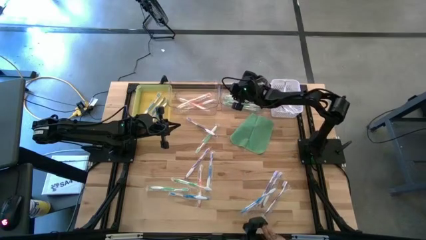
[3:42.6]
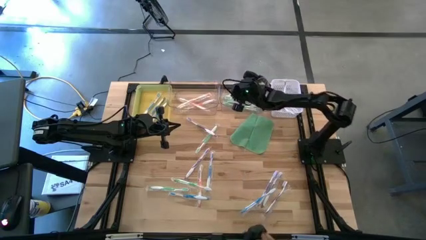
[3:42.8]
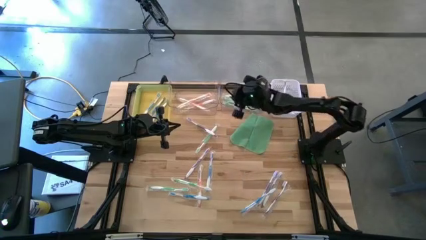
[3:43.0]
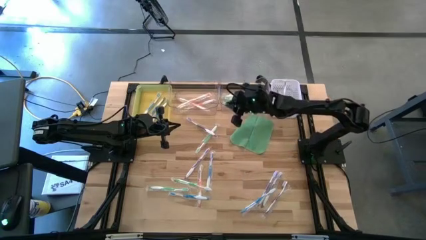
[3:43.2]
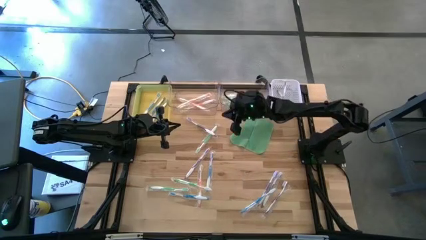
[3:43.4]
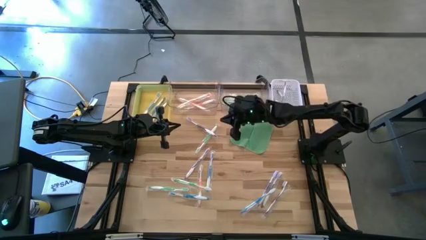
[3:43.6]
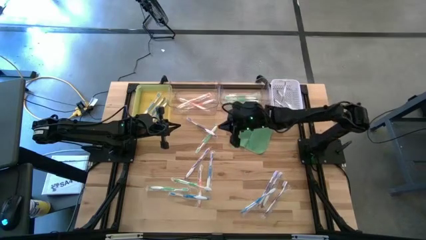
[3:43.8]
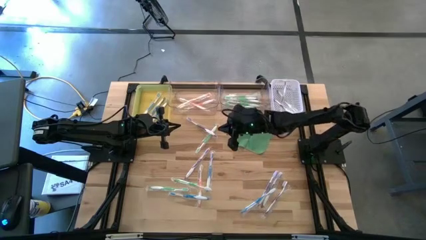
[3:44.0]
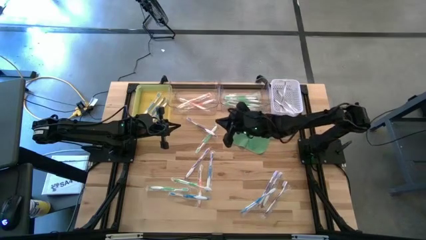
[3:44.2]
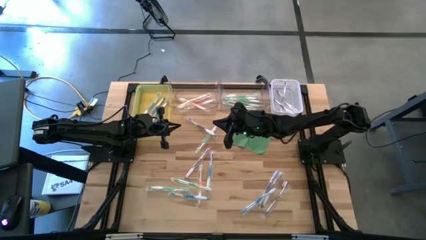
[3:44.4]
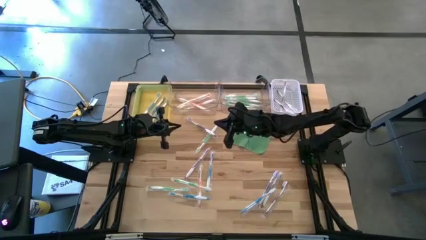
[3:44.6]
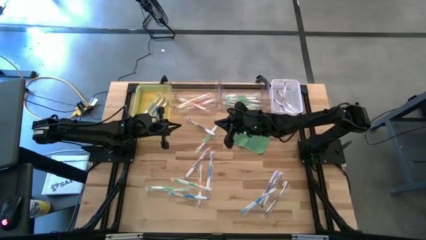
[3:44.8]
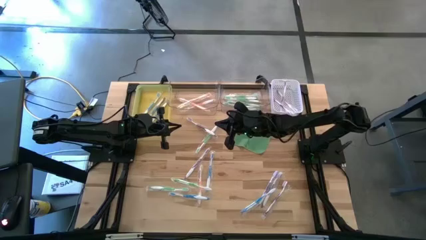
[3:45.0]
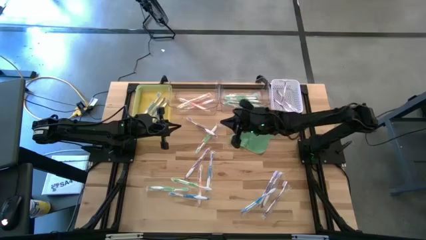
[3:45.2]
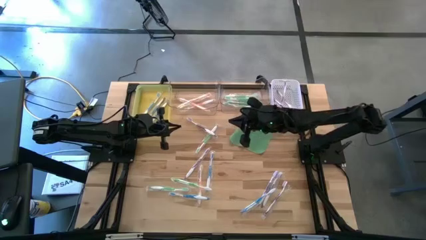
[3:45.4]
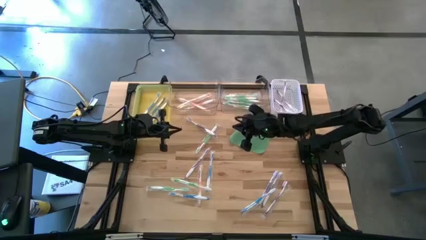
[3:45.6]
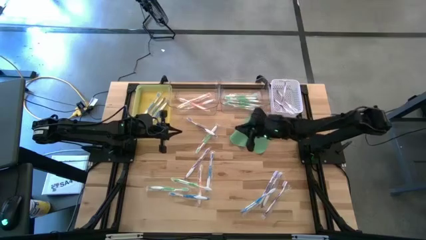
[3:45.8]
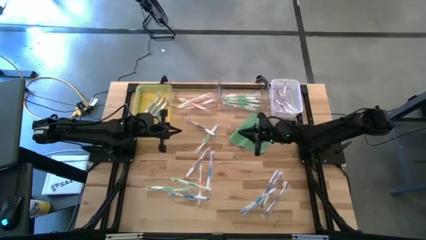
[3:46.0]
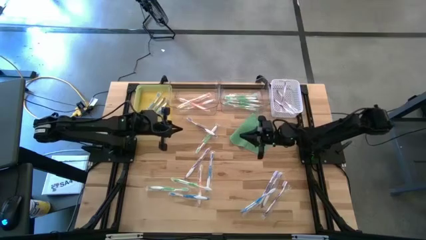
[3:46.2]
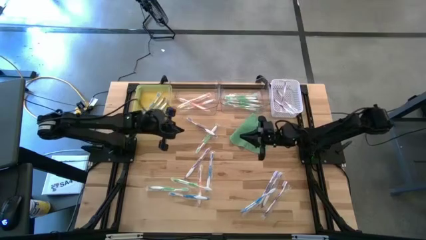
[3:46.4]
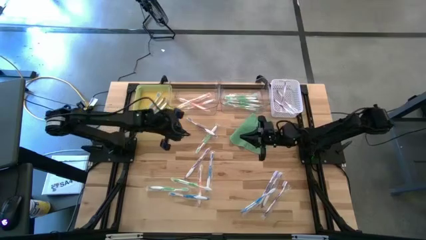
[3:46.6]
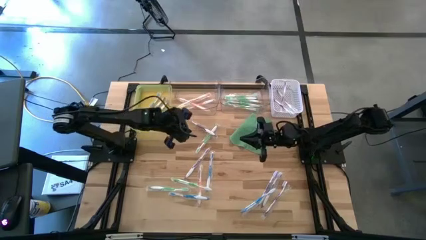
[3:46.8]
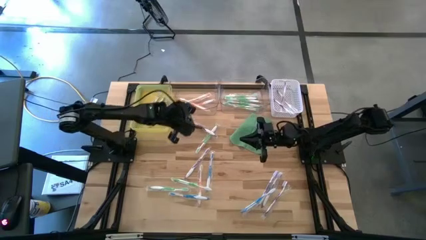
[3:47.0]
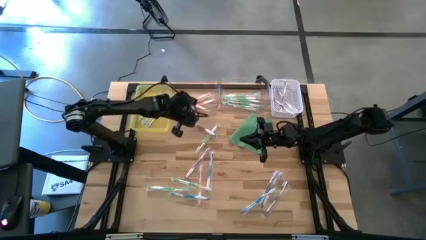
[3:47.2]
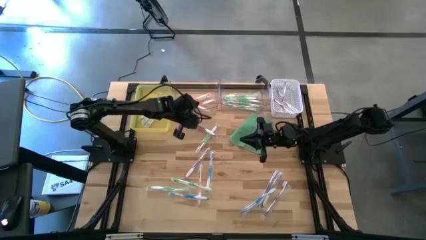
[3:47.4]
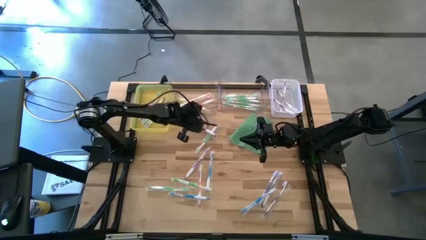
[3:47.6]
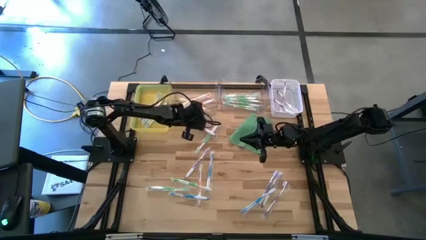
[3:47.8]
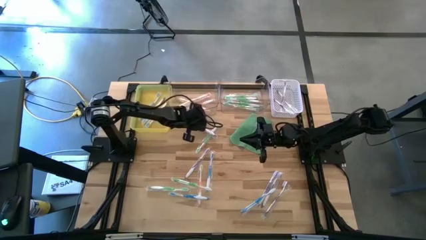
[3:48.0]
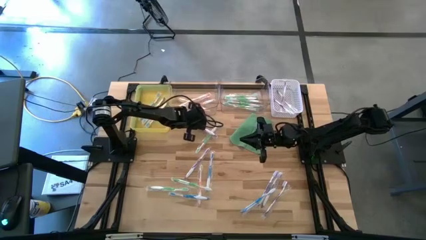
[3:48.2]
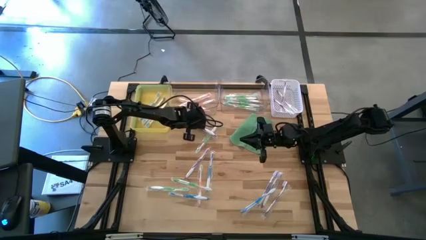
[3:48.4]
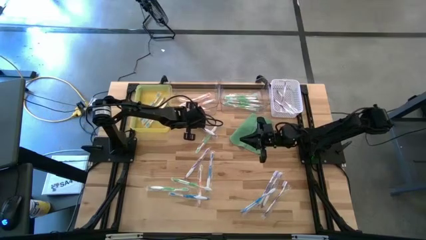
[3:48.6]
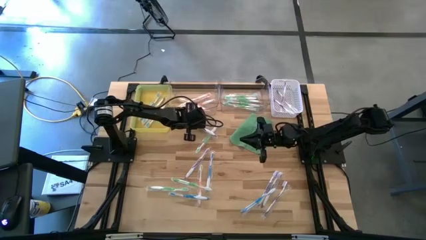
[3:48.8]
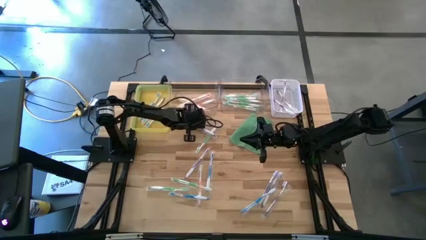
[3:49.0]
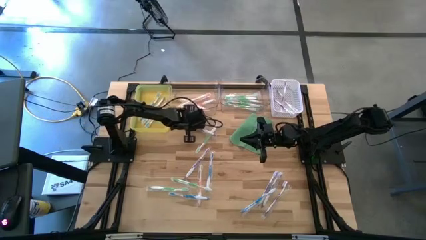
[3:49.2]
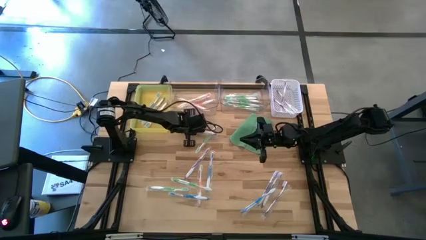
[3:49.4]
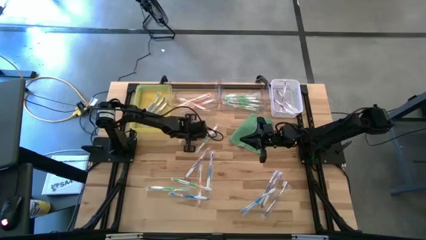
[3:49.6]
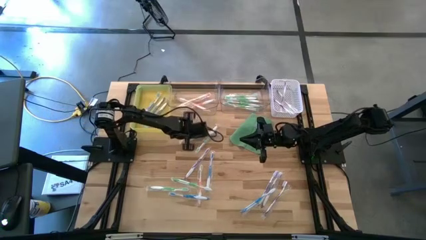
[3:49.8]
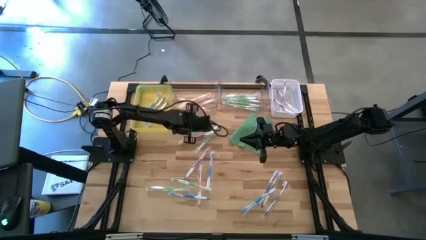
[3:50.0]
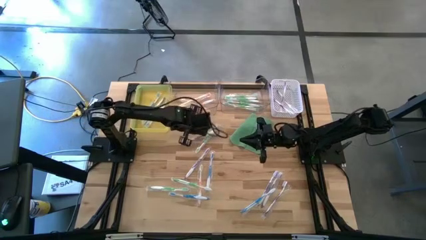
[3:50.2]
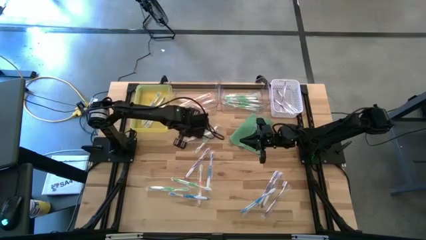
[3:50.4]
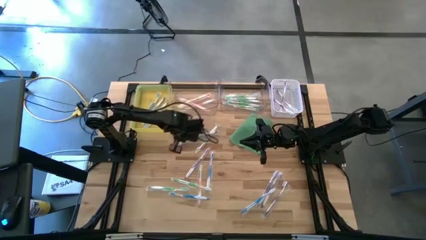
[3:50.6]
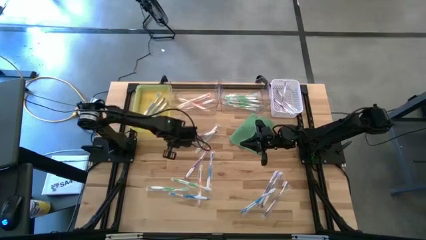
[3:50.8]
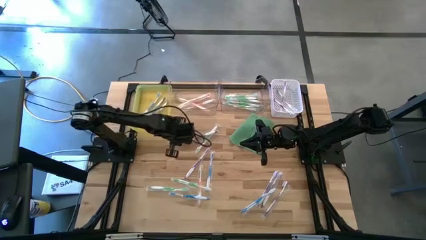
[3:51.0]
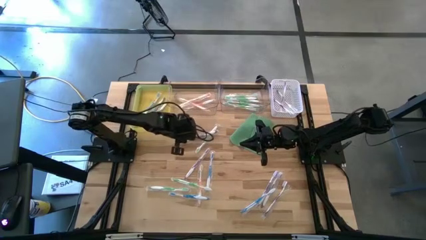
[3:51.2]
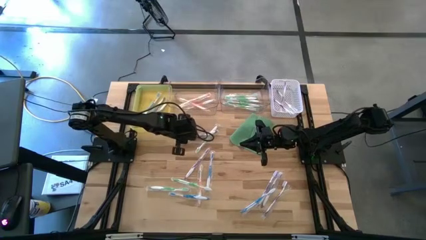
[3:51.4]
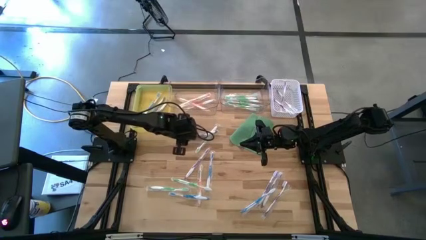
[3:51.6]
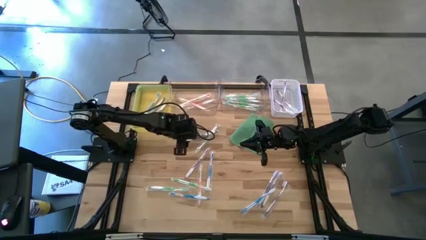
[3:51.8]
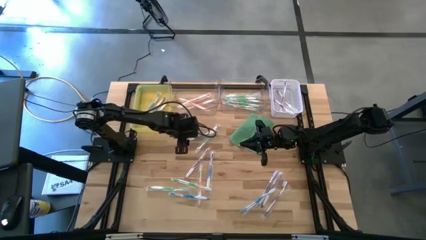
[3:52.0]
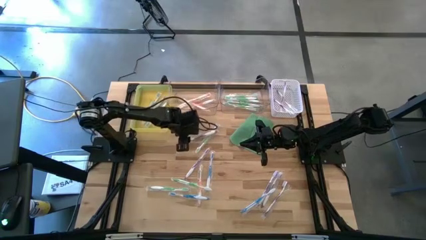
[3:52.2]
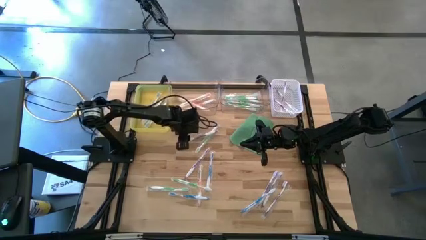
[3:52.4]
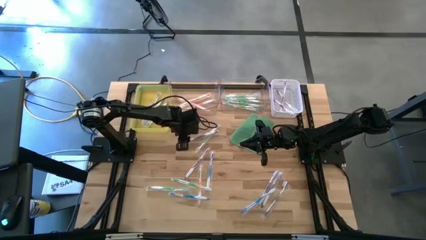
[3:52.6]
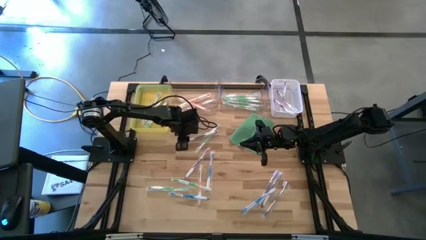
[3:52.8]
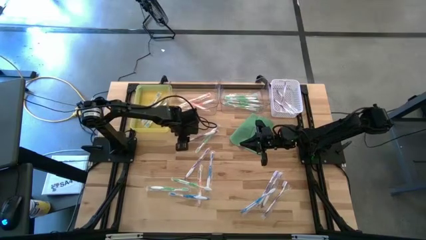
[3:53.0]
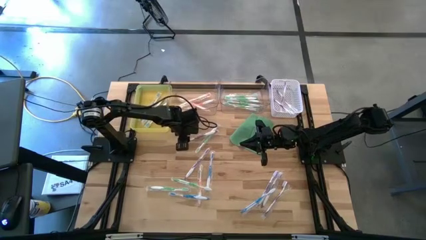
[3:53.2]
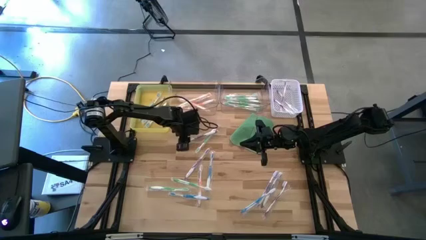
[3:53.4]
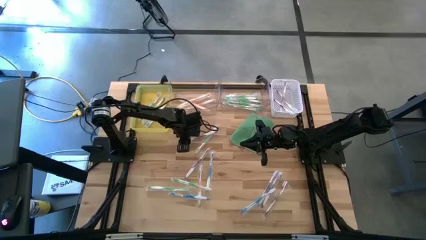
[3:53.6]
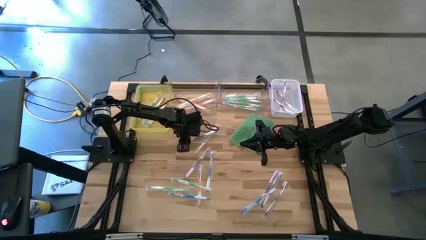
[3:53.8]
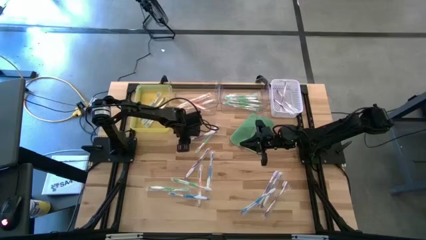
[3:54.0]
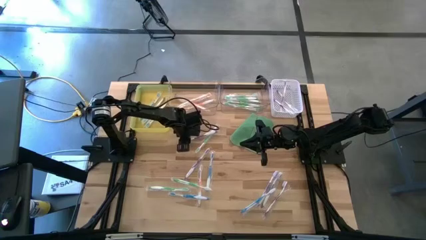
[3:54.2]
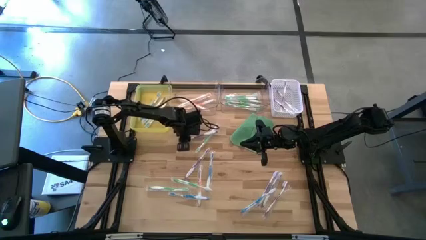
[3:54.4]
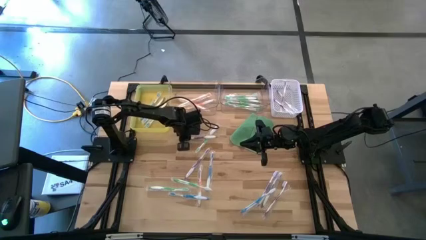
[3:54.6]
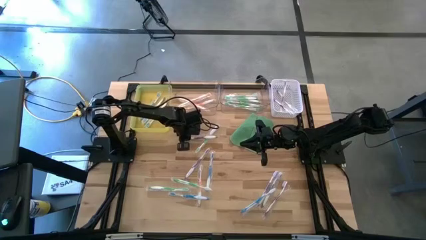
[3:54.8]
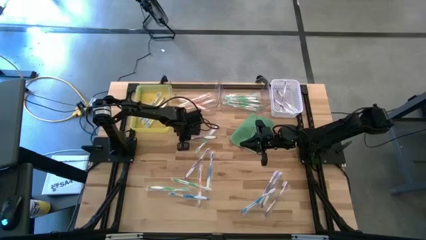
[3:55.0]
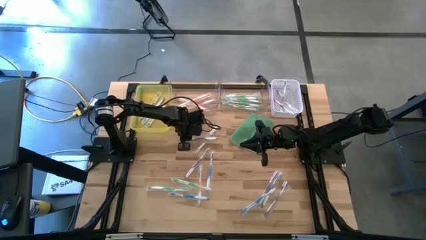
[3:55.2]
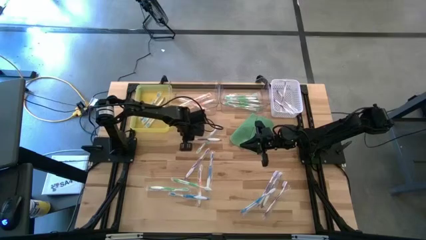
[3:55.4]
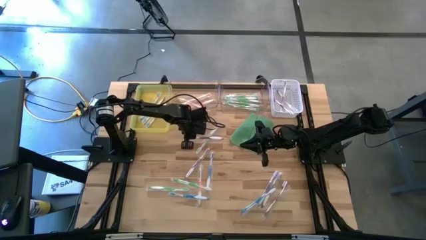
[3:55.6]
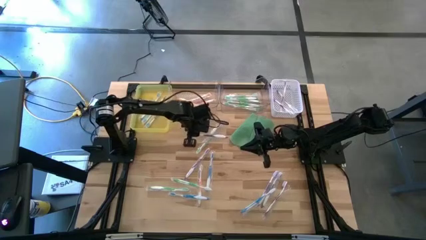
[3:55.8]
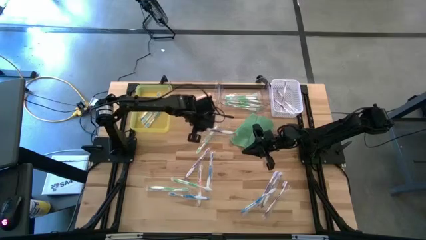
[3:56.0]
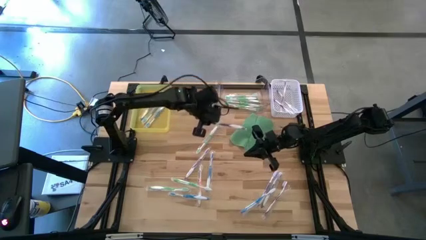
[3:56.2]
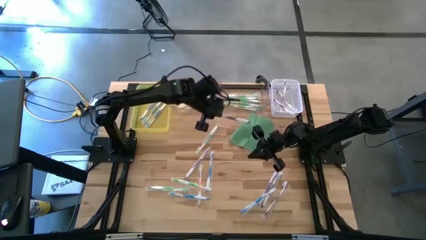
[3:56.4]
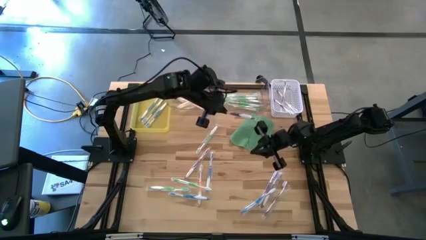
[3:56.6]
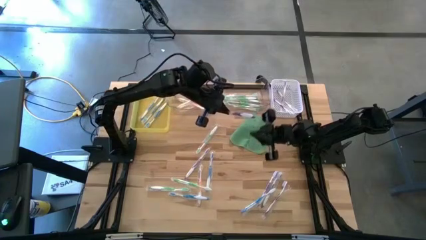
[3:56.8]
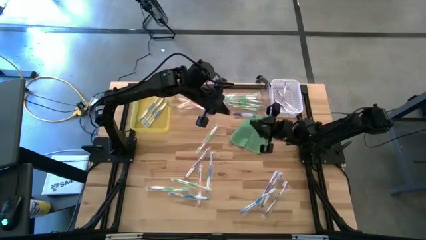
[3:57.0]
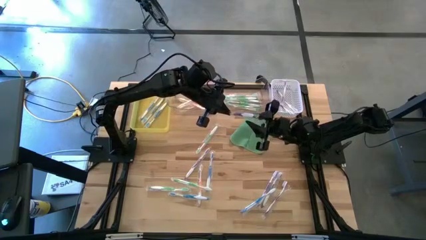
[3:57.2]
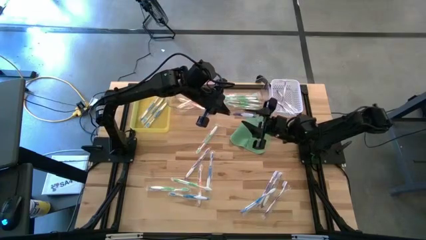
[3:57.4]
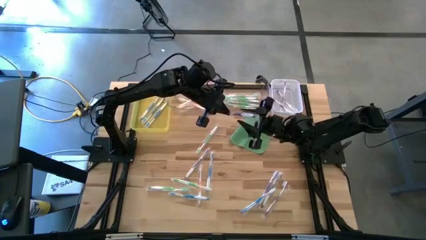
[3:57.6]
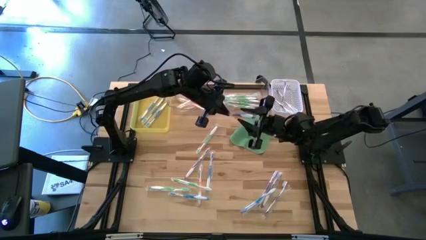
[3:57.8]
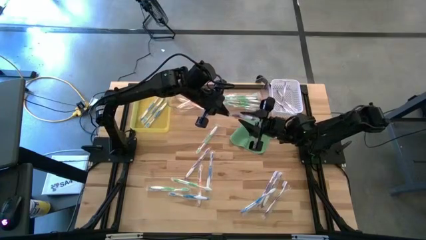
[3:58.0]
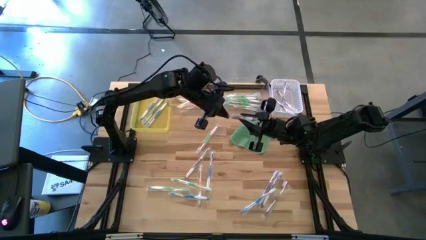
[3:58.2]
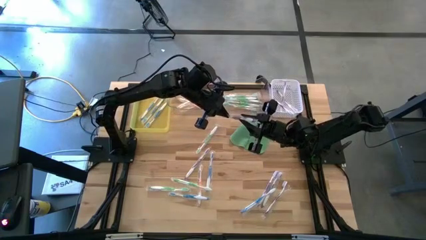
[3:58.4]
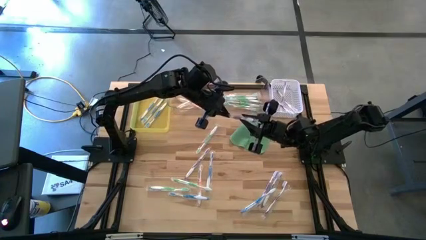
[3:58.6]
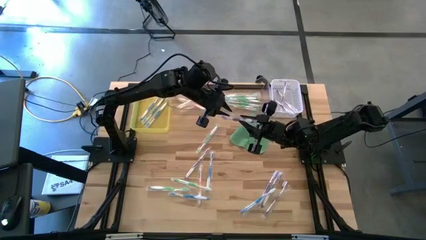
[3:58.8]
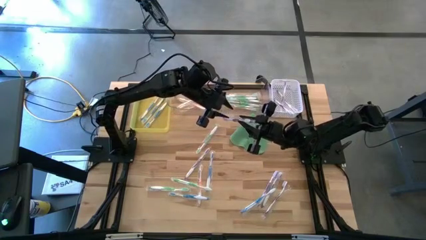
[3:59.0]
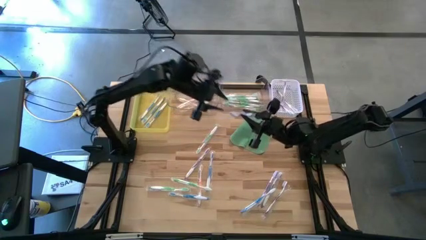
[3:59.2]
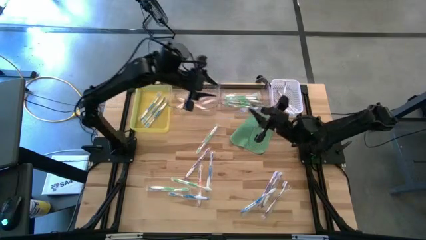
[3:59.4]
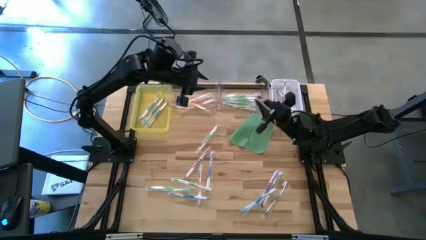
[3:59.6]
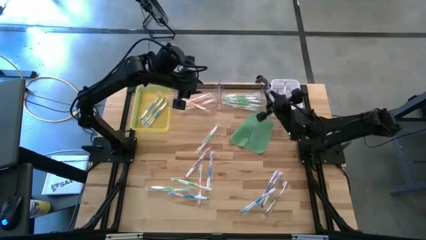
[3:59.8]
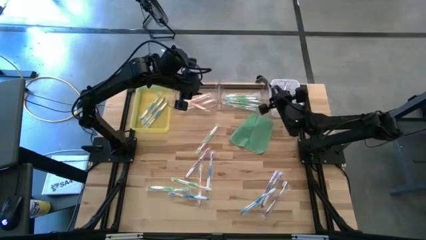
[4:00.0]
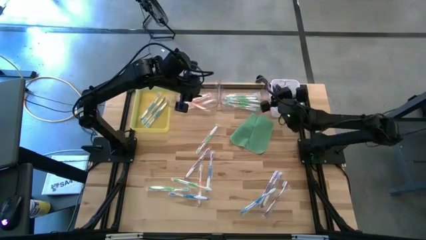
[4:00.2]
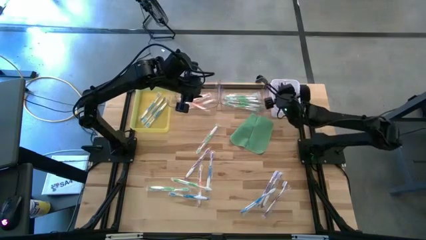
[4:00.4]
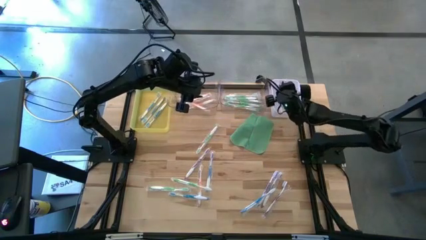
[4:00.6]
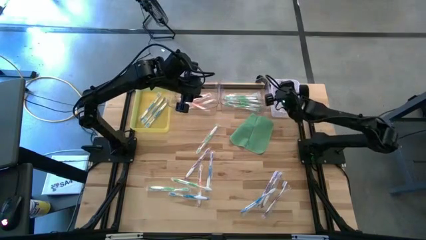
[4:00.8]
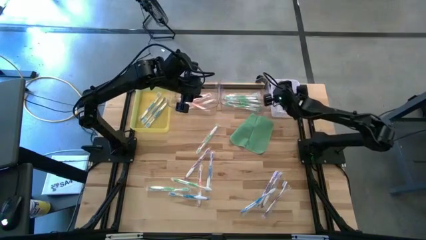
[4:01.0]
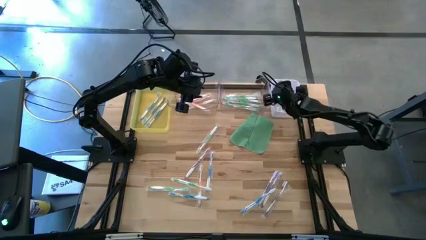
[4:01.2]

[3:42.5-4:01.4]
Task: Pick & Place Toothbrushes
Put the purple toothbrush into the white bin
